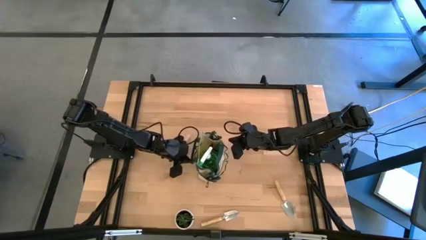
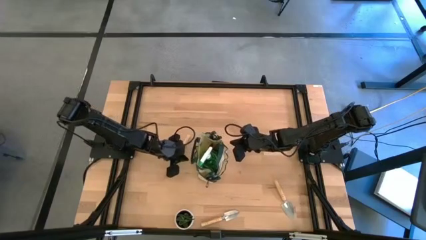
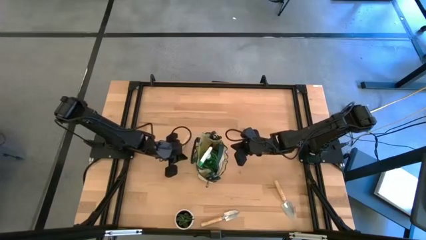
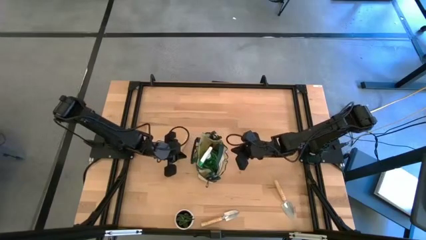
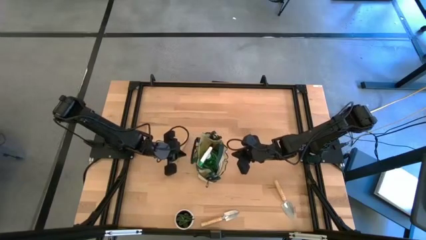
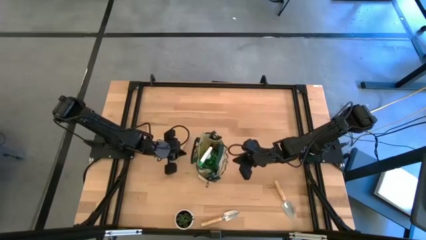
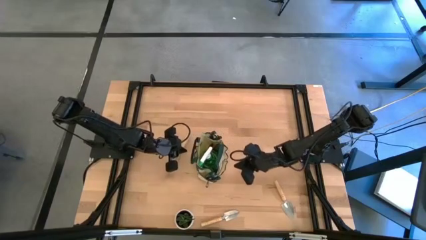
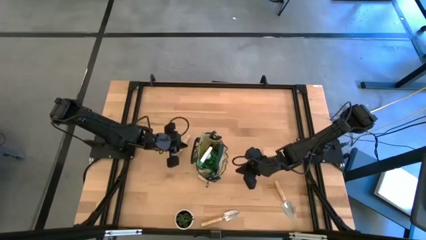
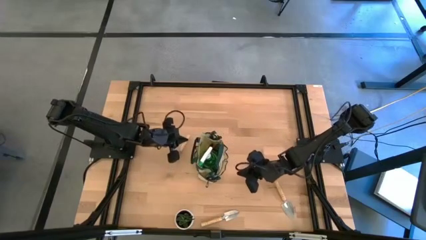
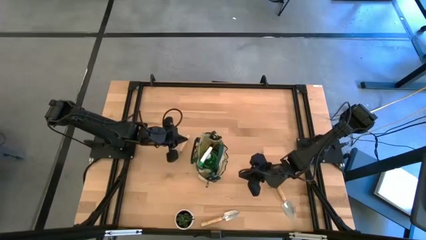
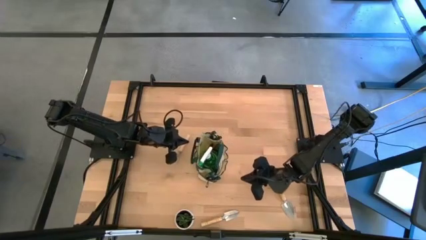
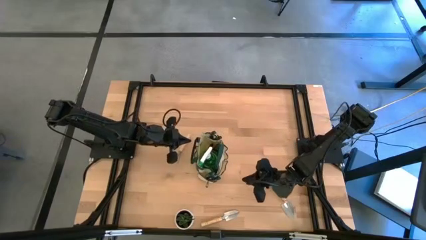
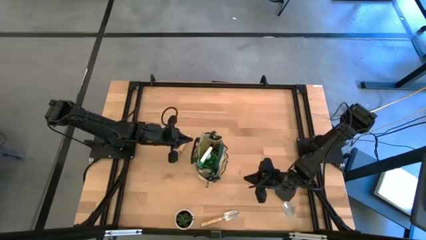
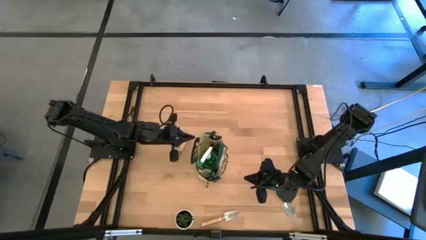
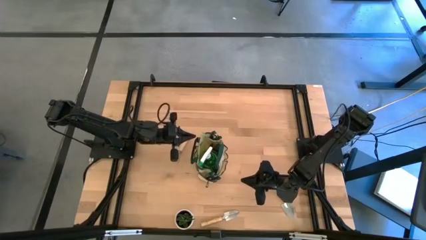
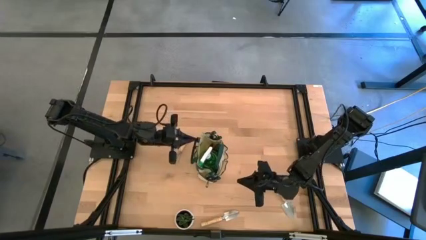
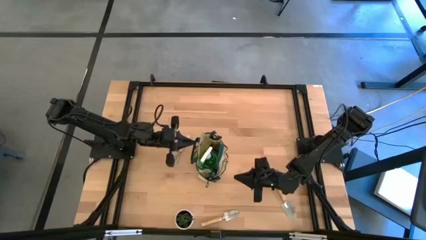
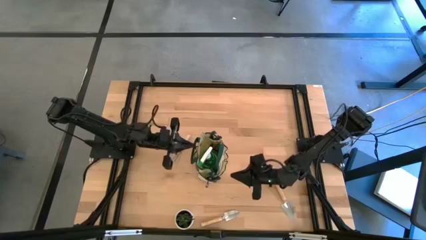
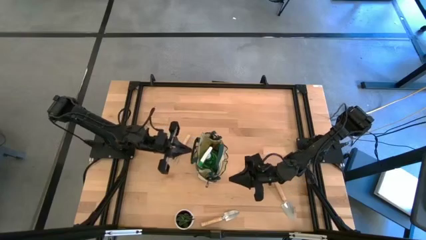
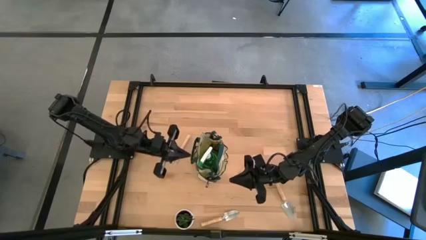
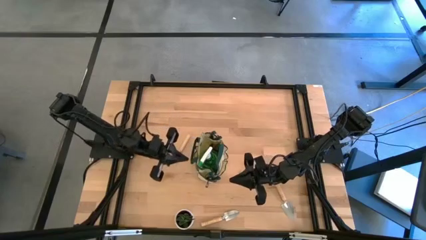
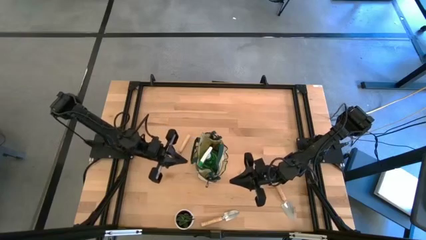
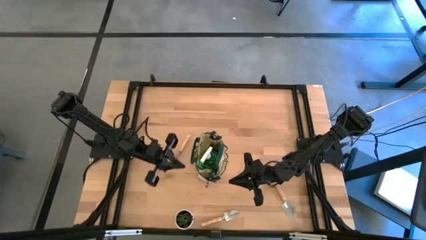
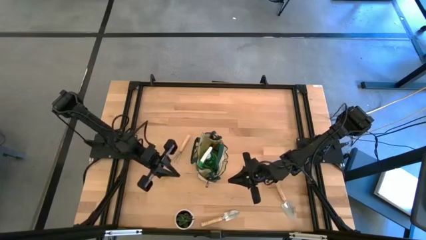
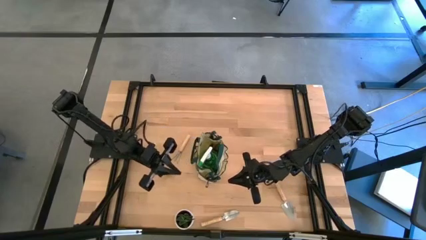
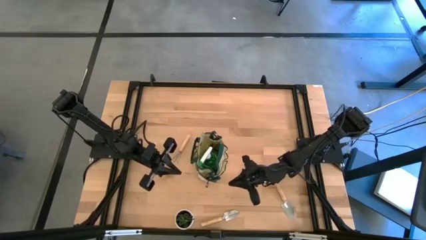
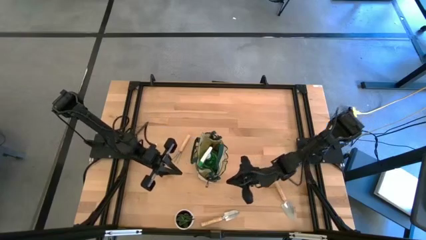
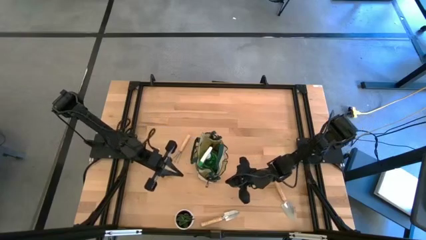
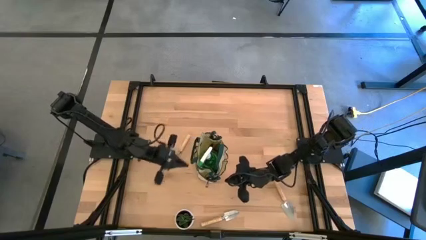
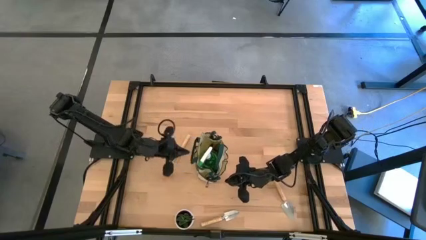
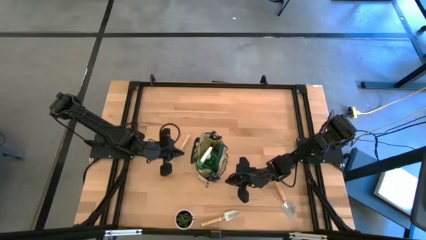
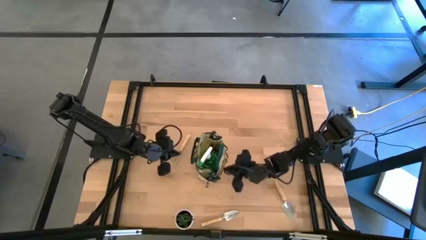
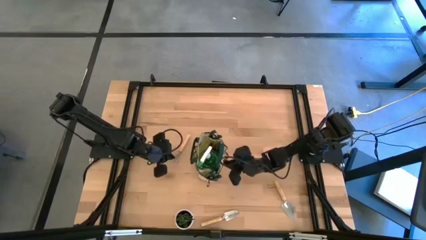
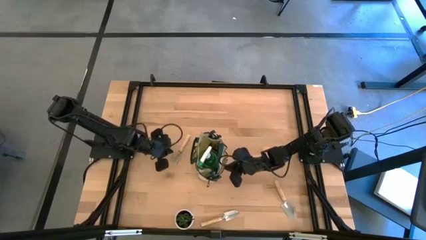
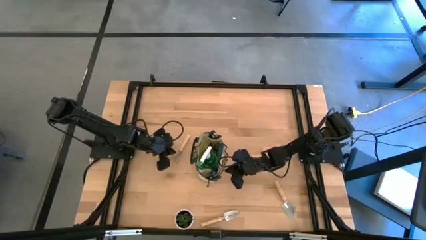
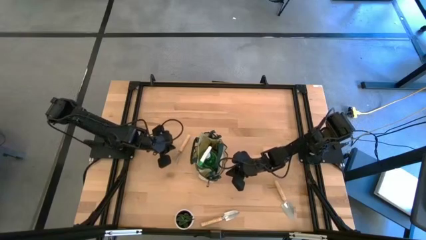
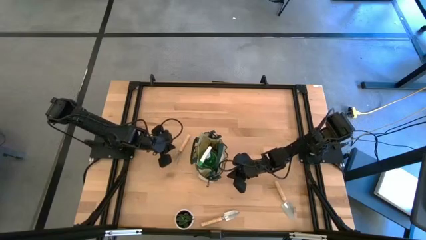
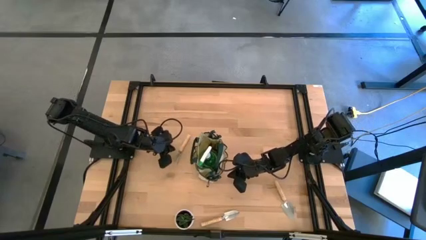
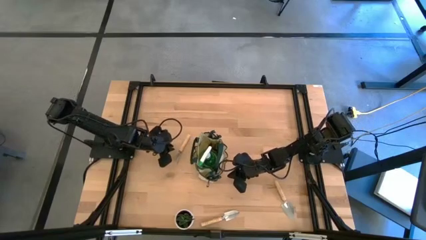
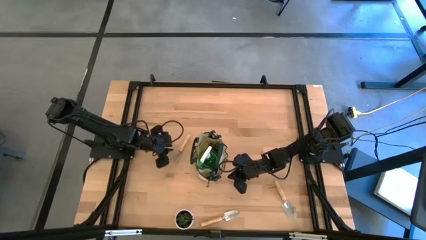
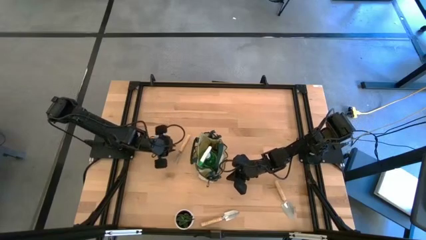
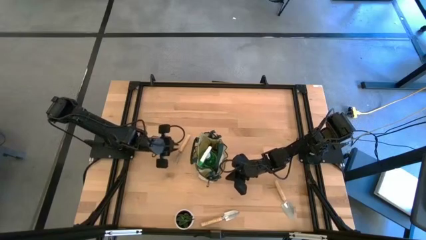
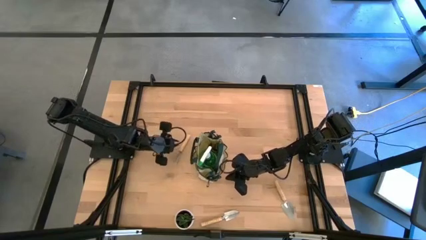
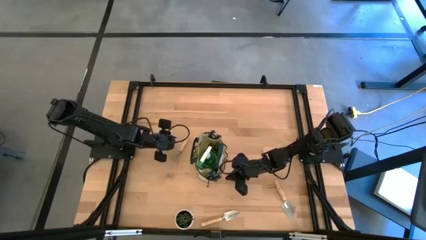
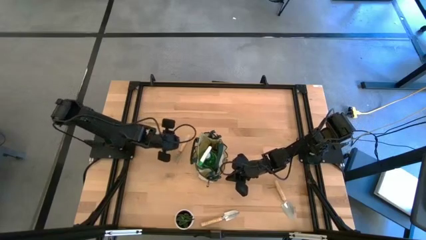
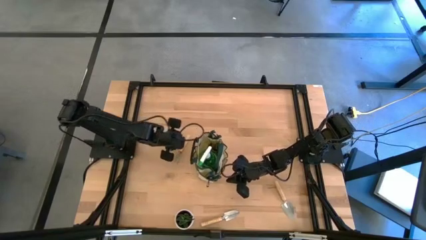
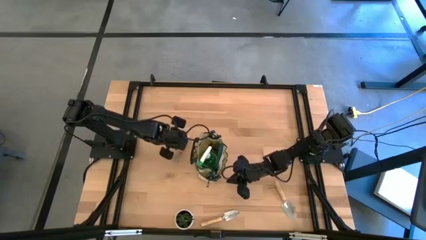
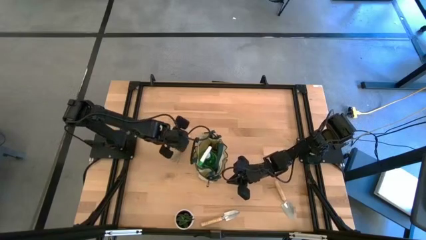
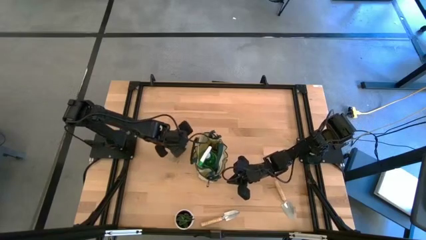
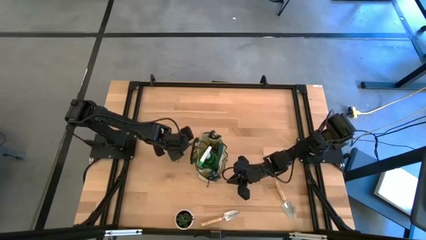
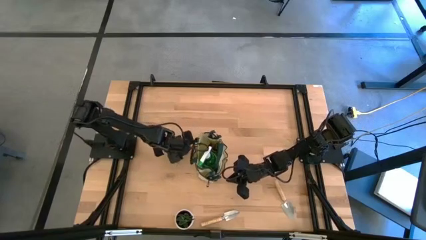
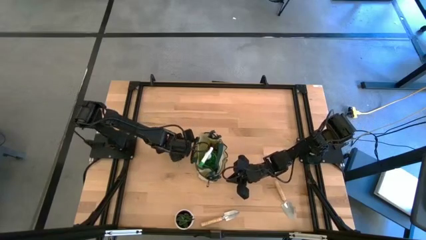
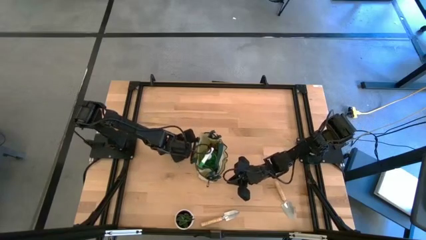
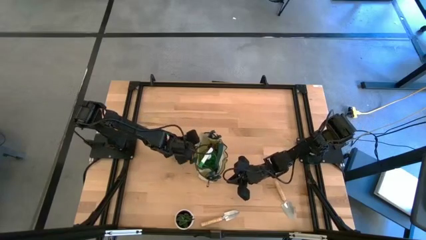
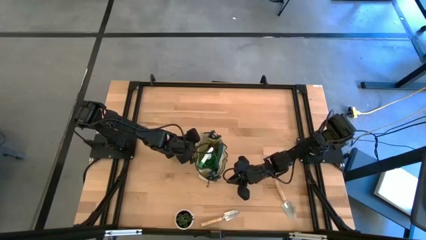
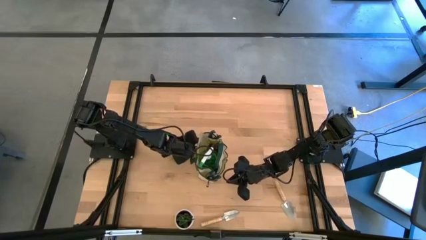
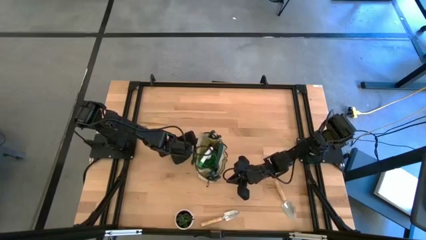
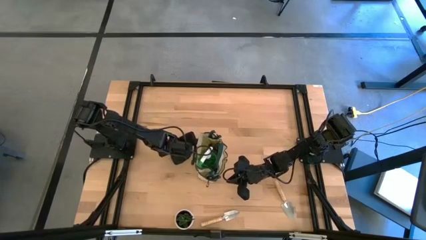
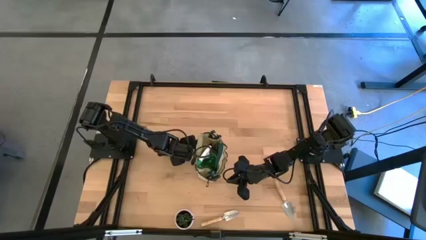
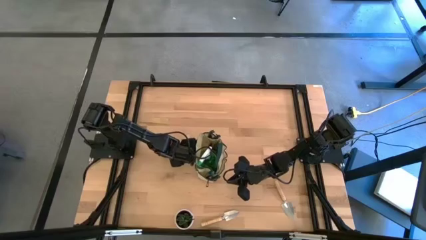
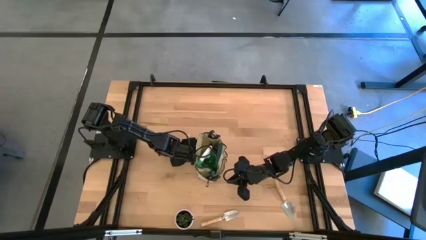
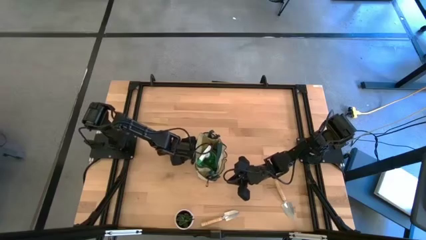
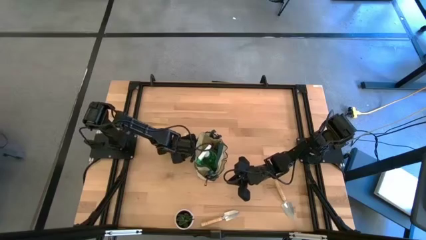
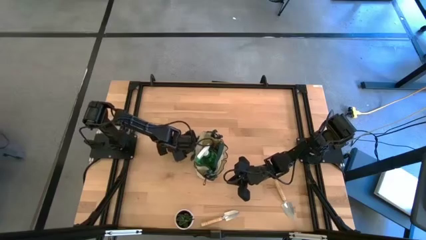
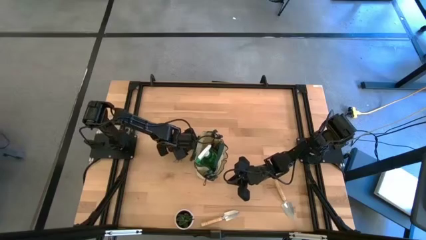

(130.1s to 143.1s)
Task: Pick & Place Garden tools in Gardening bag
Put the brown hand rake into the side pocket of the green gardening bag

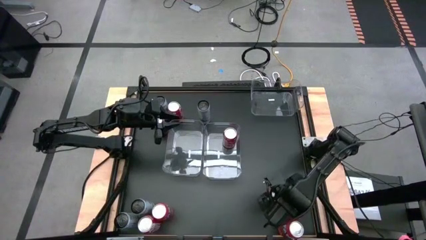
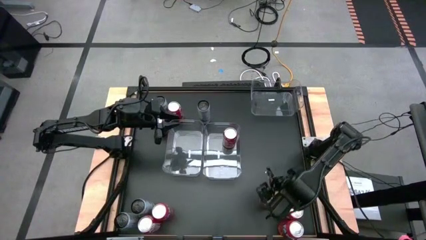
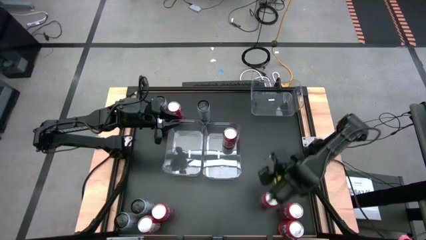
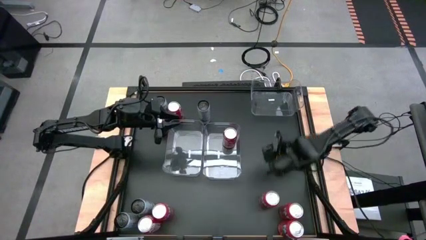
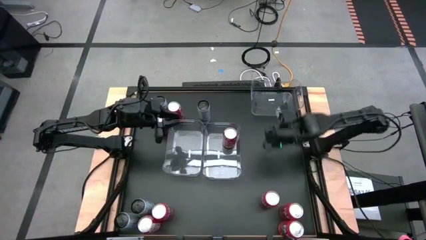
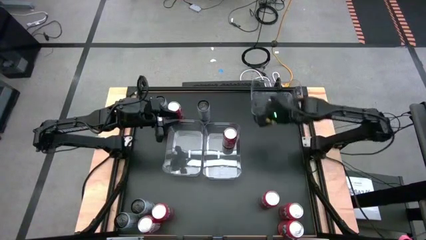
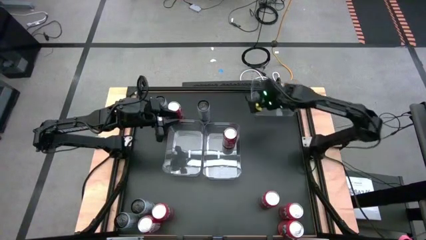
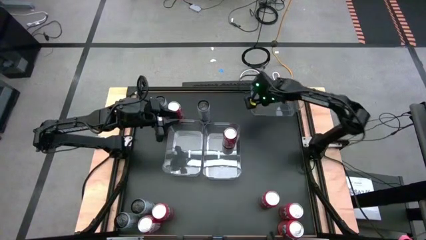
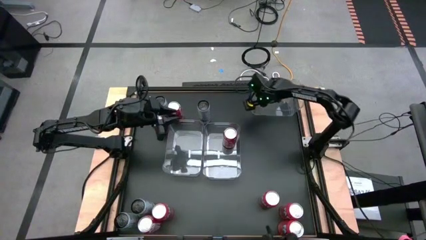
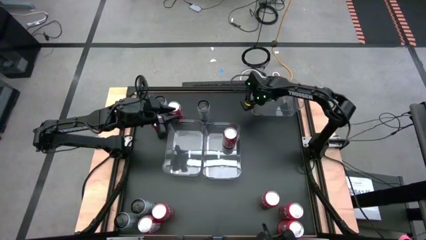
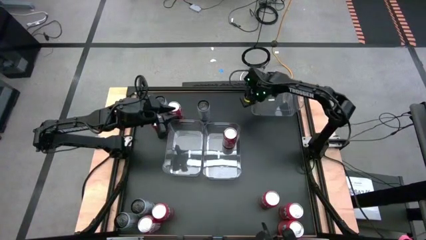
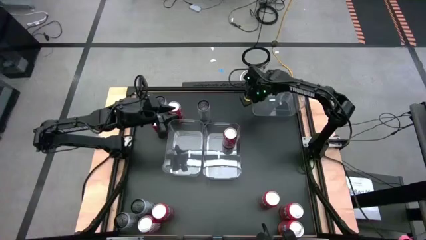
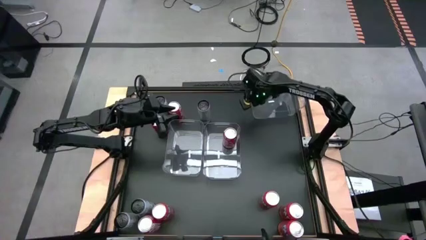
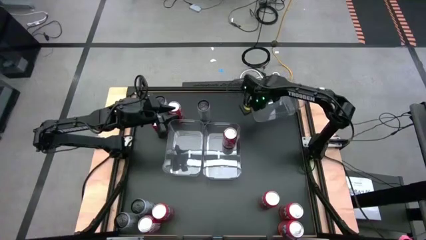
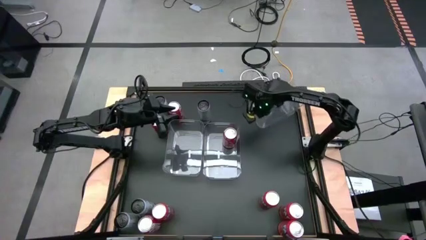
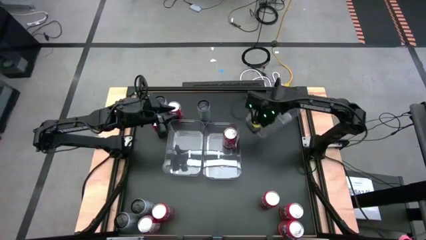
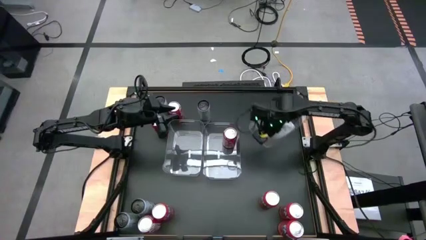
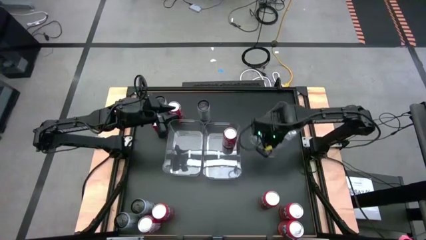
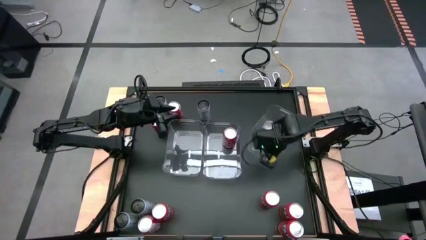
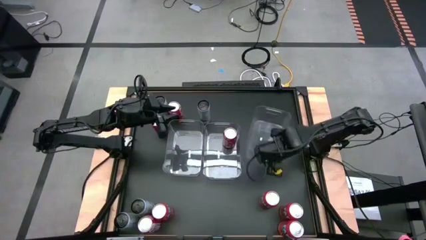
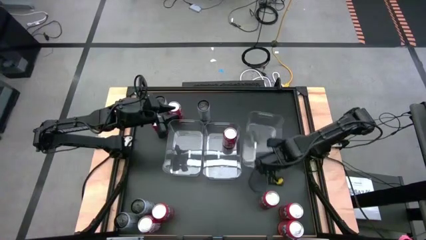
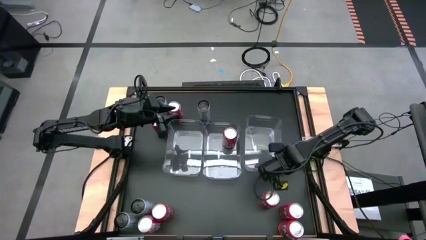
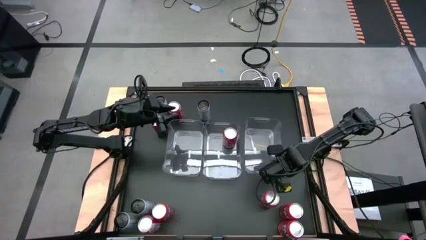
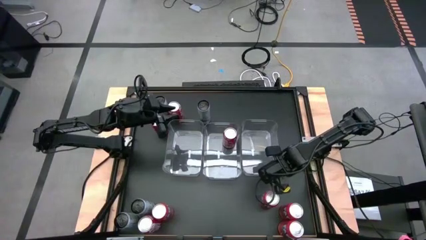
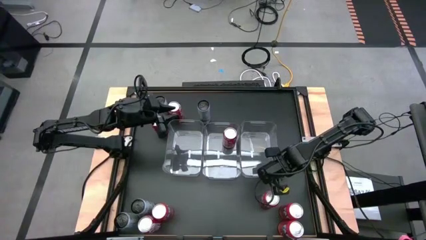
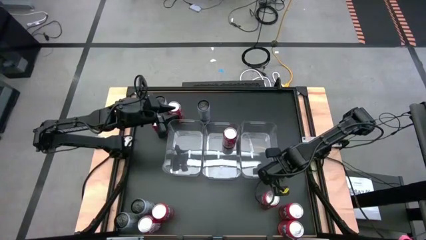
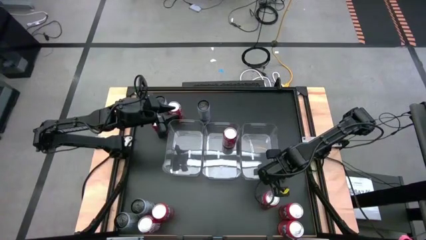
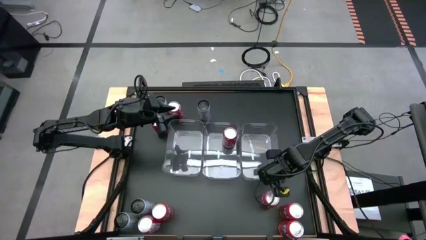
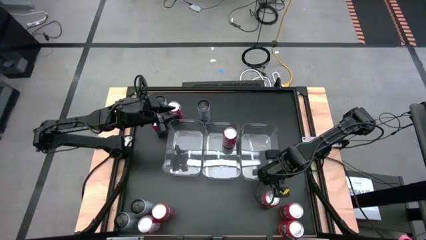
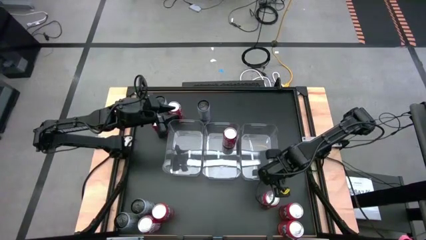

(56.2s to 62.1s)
Task: Sort soda cans
Move the top transparent bin to the right of the bottom right transparent bin
